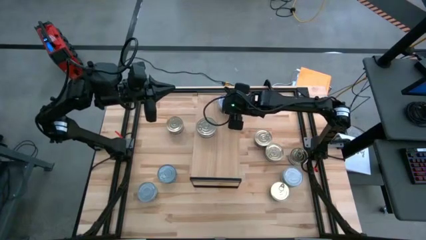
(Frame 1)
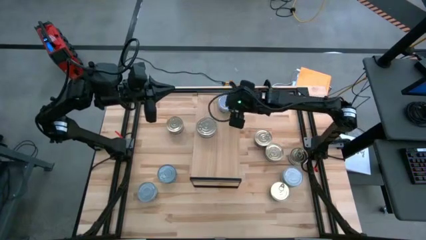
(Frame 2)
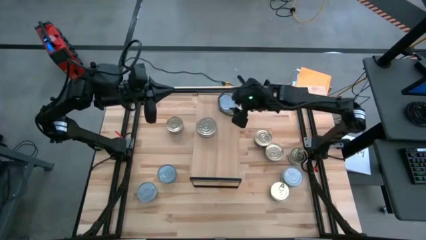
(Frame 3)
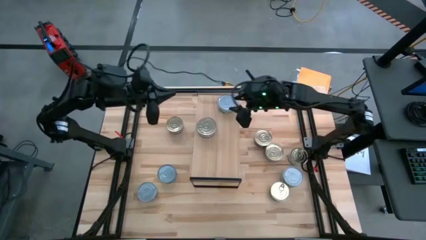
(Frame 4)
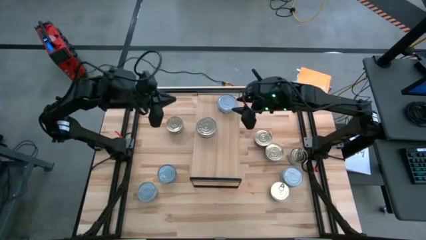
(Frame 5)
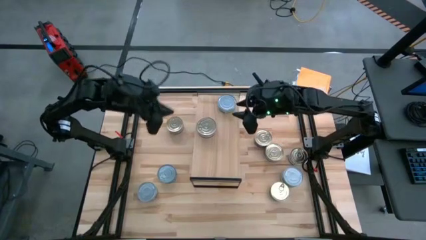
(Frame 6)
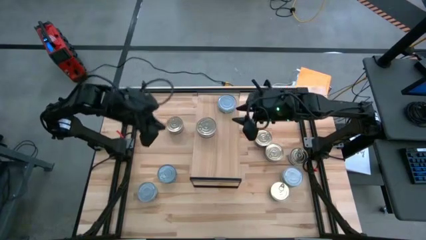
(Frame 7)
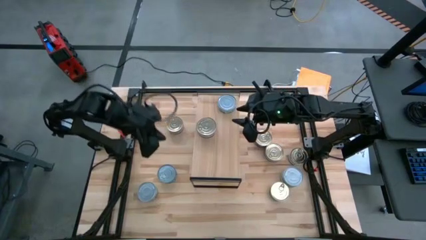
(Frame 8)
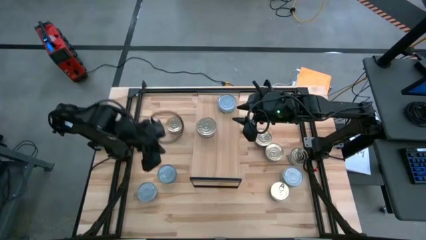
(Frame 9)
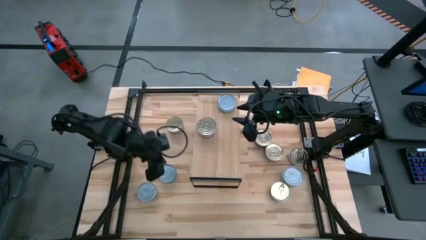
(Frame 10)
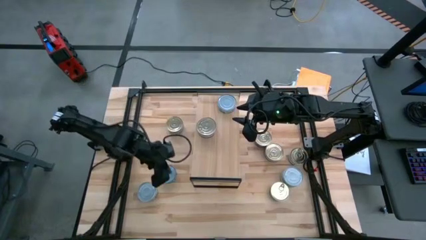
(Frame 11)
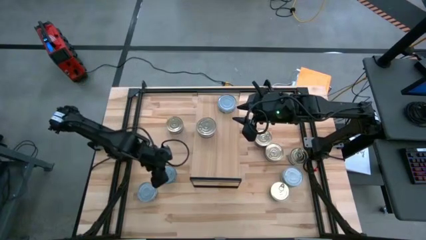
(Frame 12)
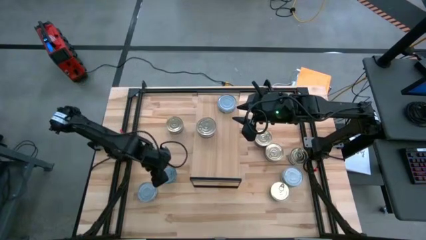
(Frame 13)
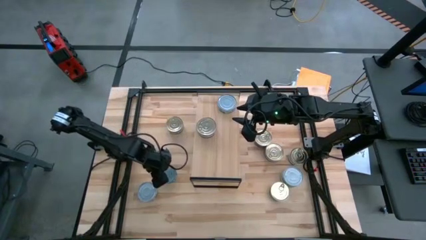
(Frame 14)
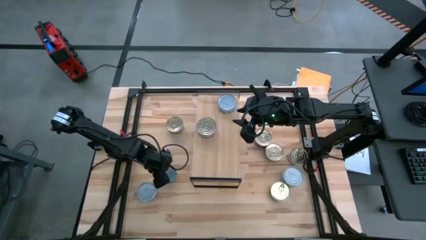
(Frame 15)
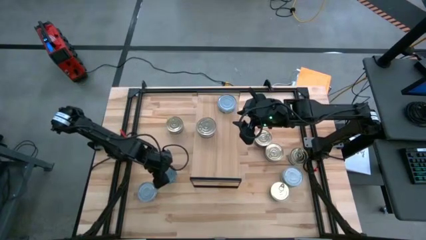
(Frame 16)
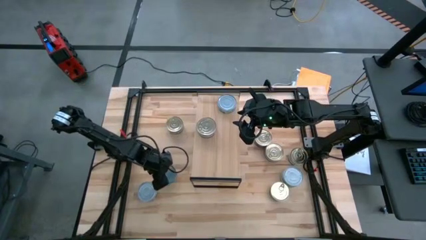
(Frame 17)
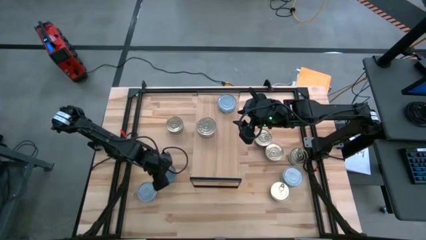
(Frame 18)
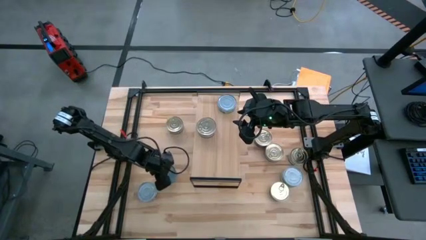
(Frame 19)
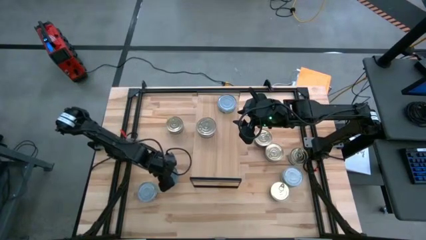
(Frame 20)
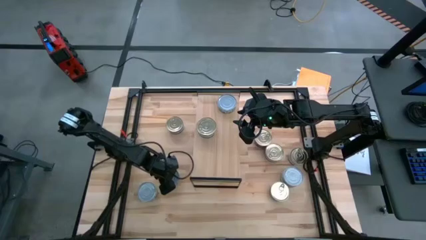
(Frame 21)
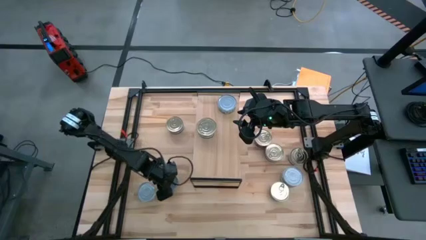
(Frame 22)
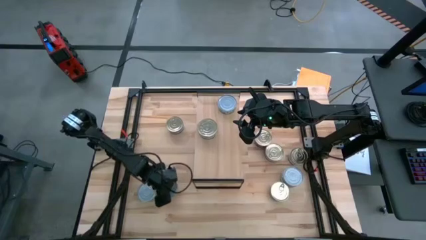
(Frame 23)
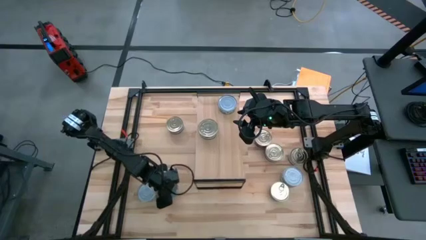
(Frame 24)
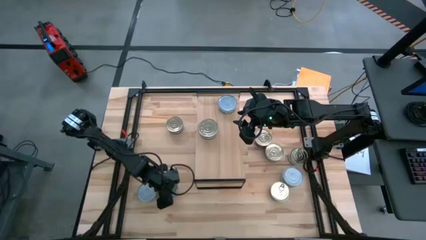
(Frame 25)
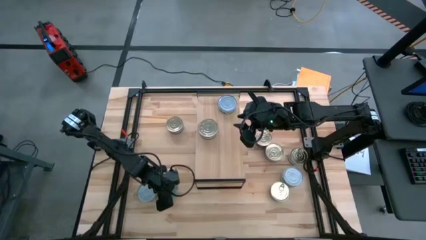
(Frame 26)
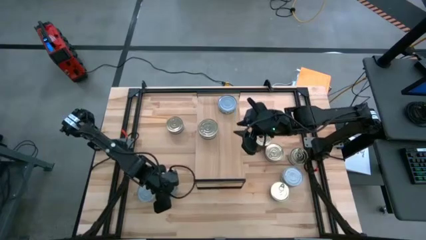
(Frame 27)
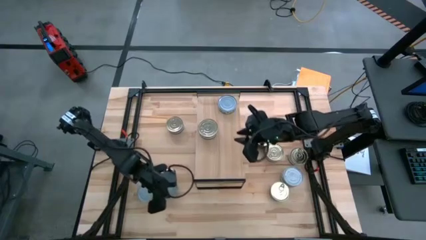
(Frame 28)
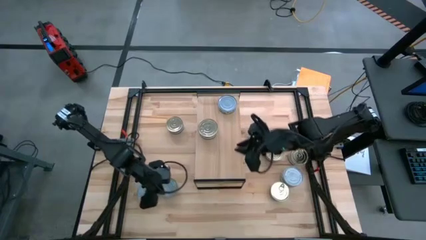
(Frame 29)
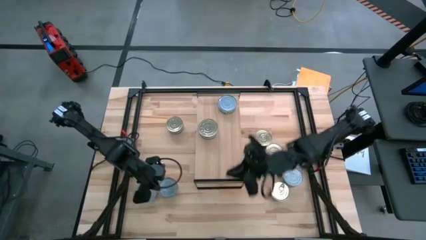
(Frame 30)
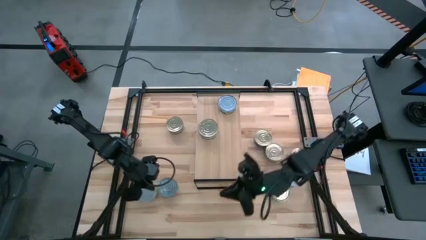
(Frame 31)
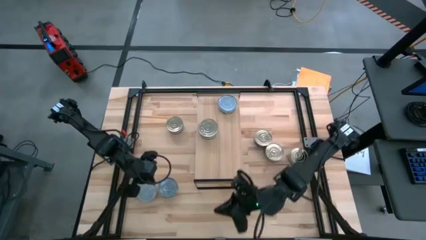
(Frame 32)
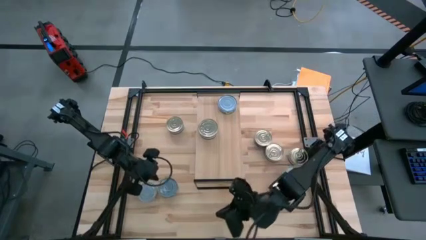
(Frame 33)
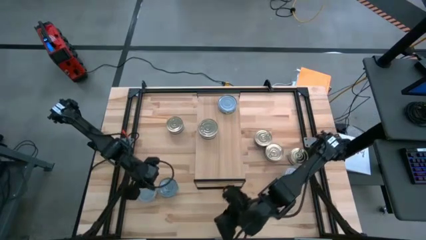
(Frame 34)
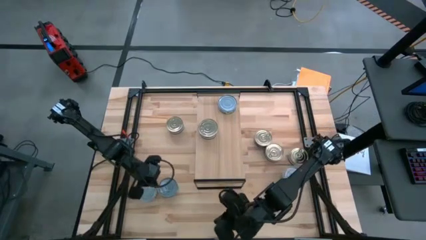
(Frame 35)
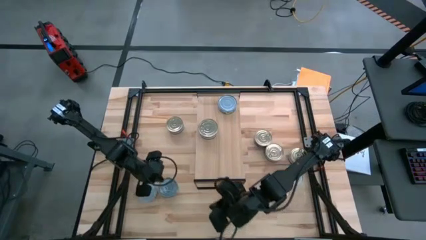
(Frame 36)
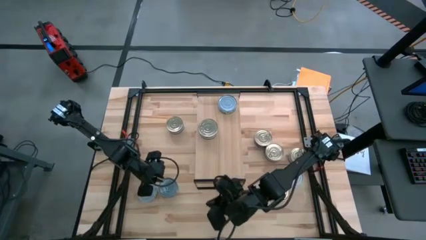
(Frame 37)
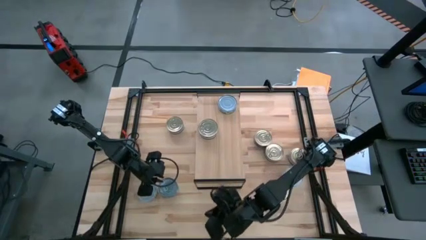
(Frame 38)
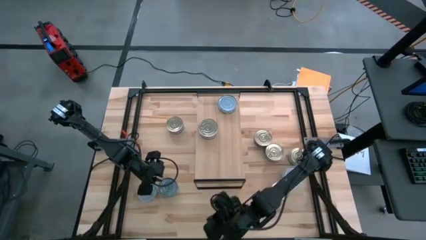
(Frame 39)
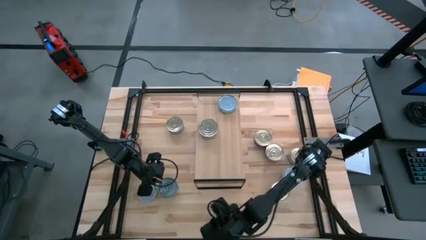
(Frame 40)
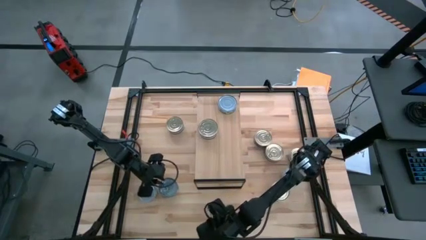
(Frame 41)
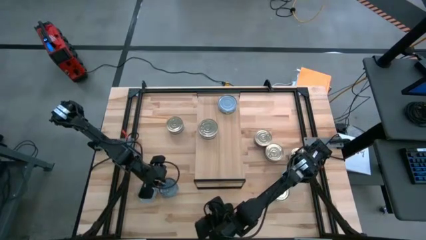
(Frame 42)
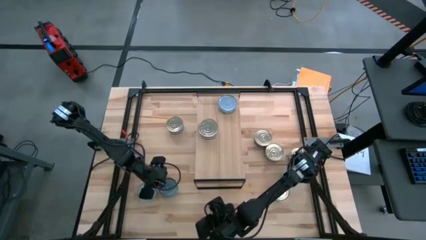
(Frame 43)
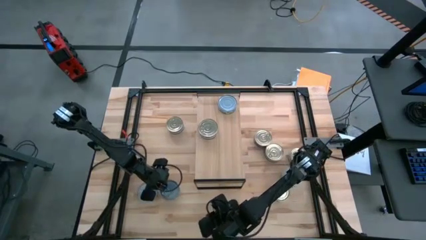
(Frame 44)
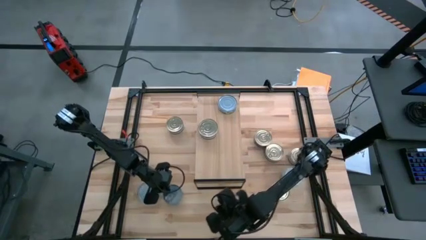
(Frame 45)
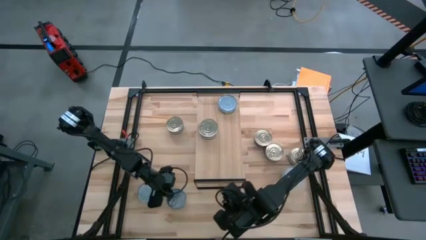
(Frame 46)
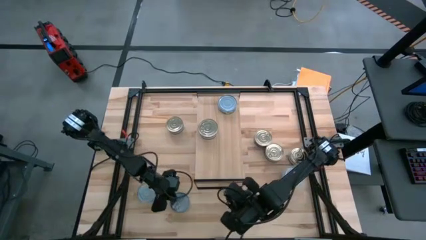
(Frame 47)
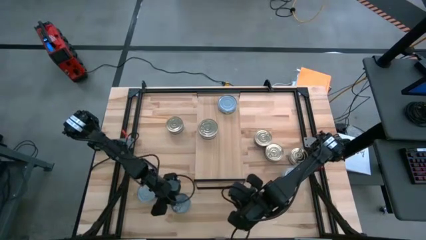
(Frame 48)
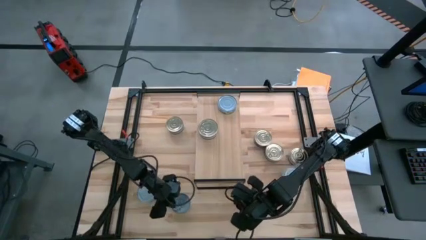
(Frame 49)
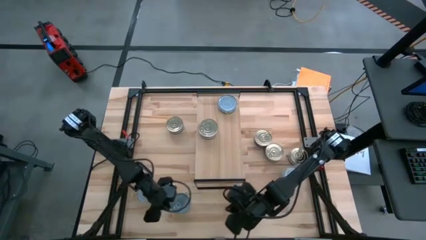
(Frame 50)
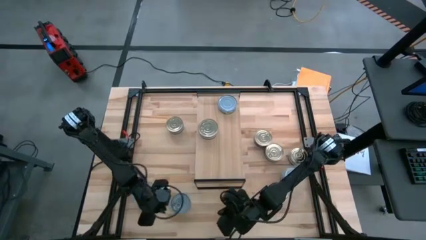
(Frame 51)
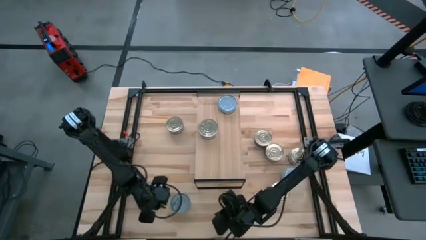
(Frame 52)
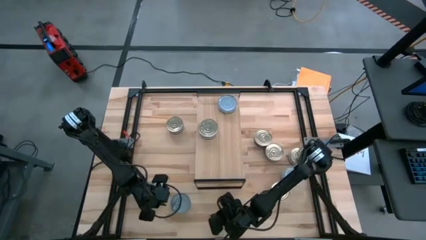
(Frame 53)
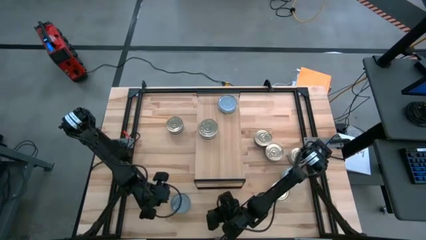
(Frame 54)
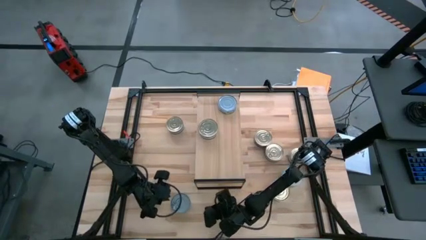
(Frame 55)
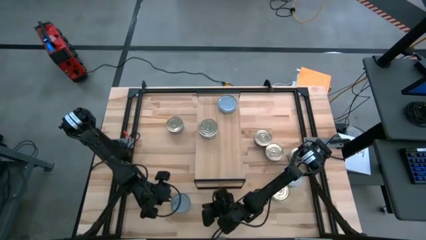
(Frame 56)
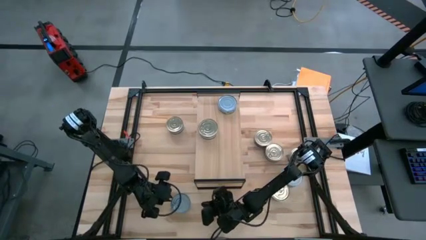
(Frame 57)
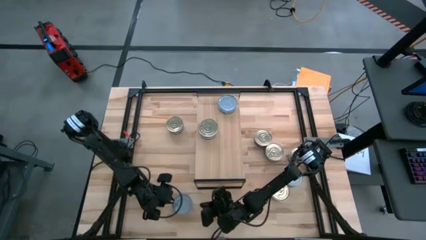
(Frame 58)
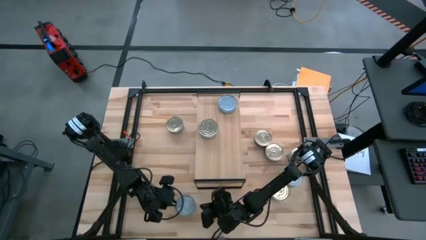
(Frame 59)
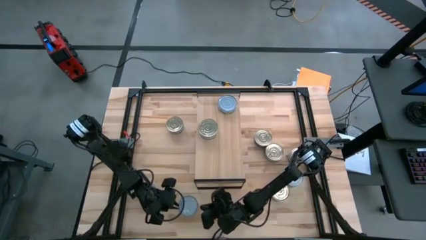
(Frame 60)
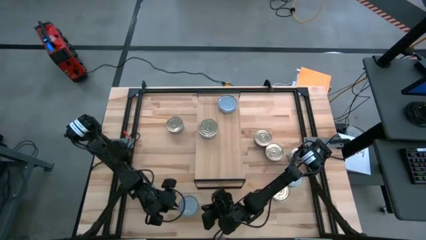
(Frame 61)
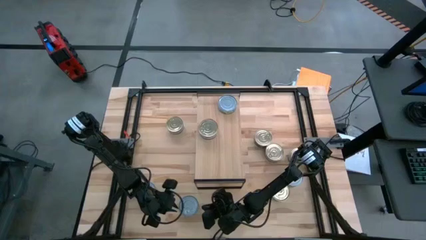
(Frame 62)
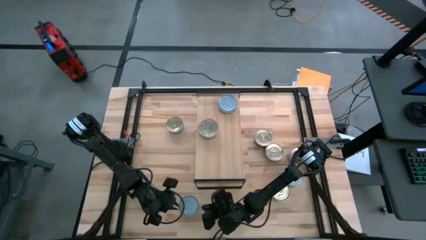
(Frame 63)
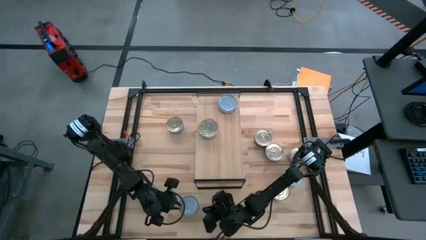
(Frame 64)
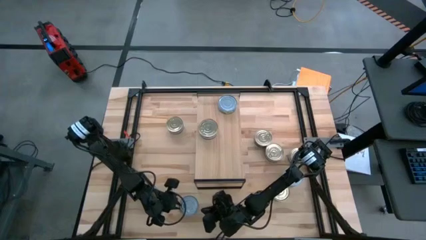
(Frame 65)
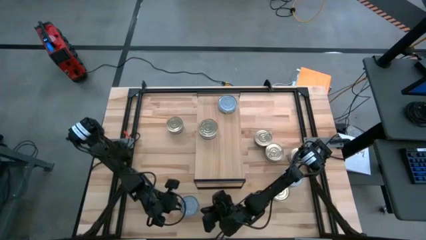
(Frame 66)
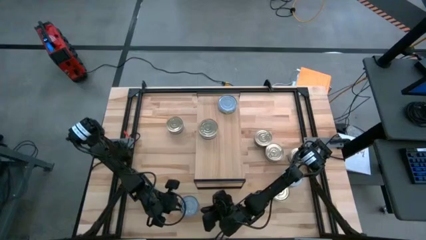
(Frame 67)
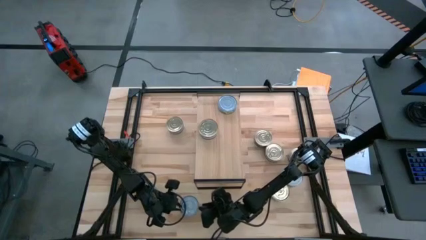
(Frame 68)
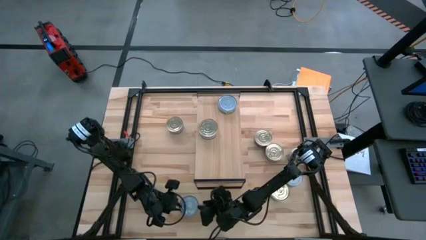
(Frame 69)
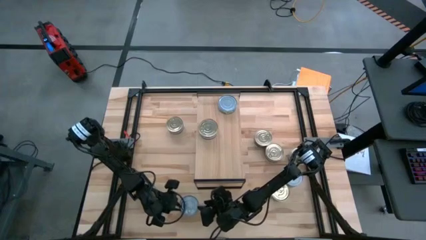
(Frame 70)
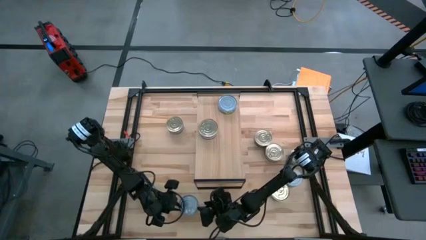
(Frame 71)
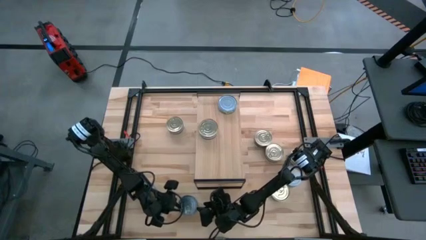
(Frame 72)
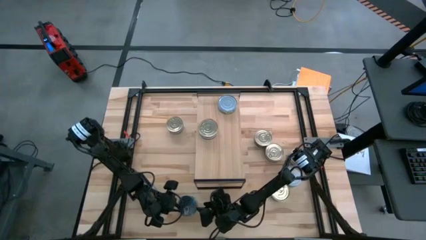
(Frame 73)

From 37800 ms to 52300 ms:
Task: Stack canned seafood by type on shelf
Put the green-blue tuna can on the shelf
